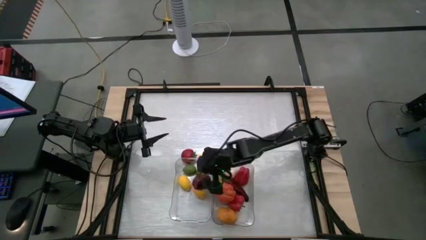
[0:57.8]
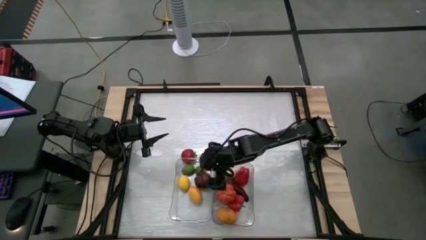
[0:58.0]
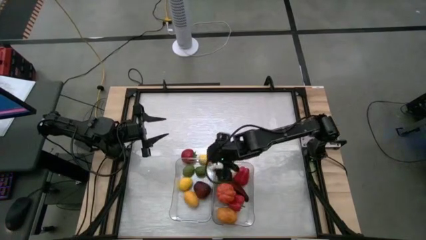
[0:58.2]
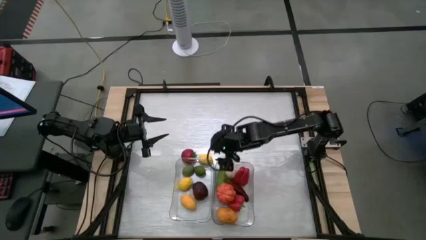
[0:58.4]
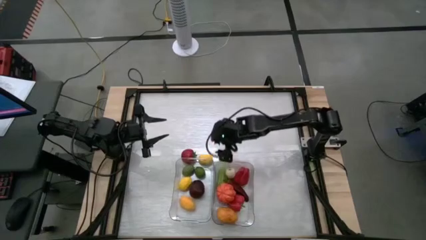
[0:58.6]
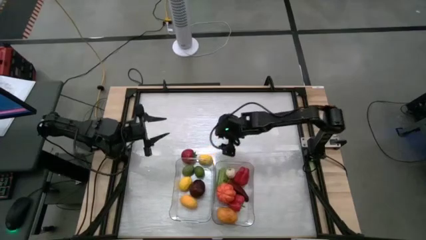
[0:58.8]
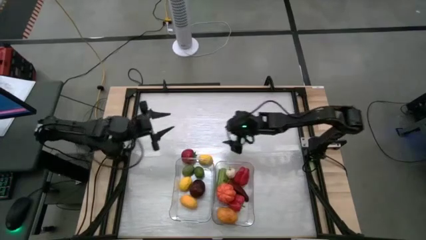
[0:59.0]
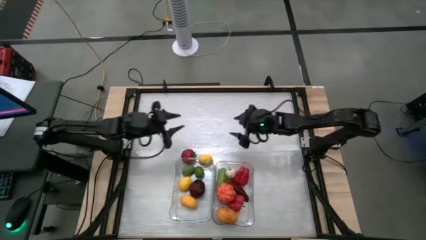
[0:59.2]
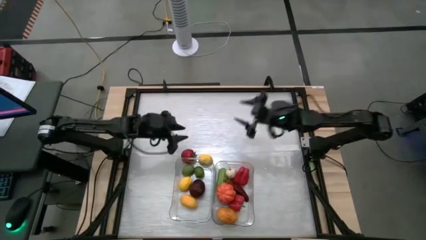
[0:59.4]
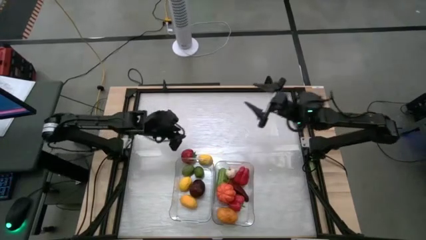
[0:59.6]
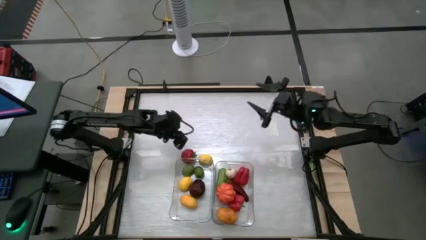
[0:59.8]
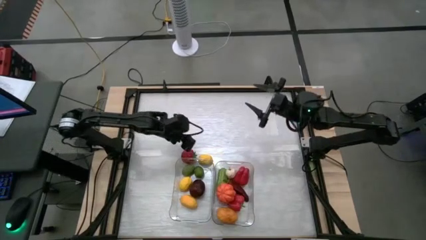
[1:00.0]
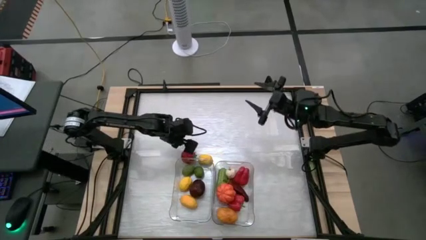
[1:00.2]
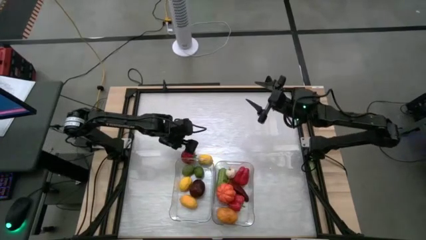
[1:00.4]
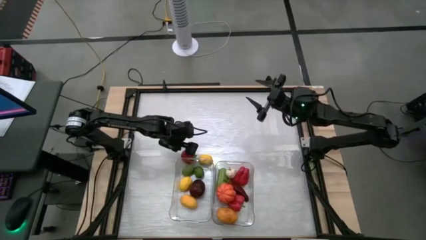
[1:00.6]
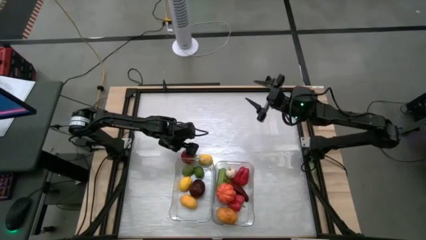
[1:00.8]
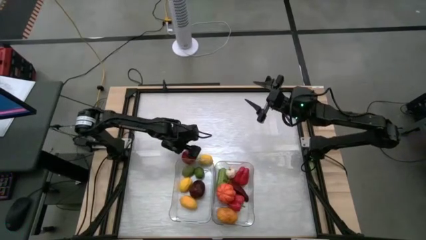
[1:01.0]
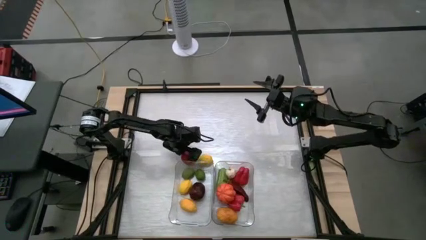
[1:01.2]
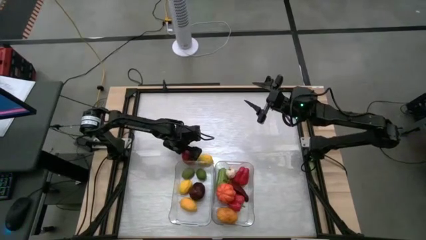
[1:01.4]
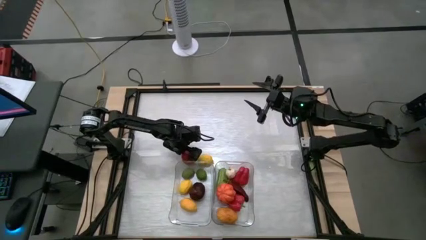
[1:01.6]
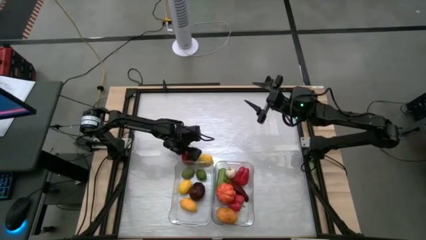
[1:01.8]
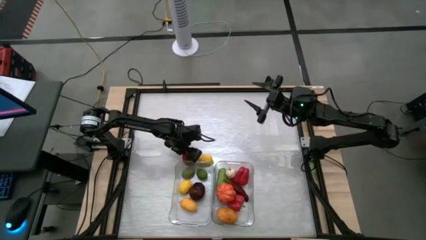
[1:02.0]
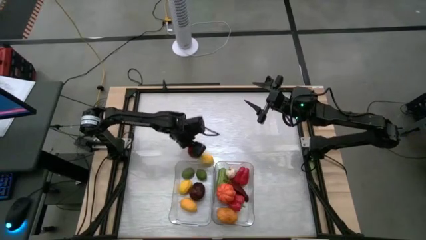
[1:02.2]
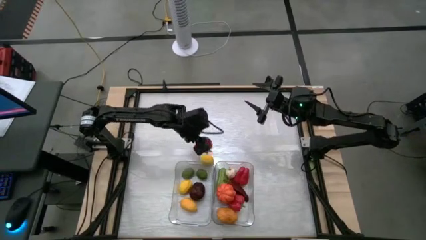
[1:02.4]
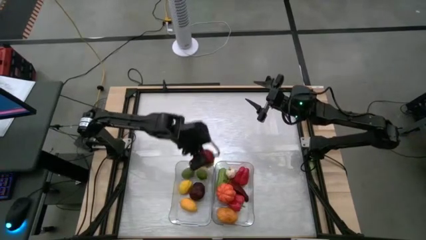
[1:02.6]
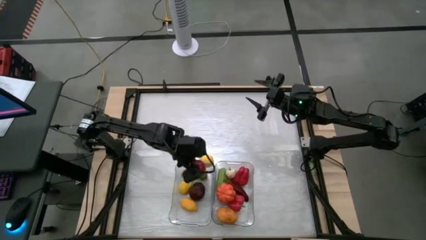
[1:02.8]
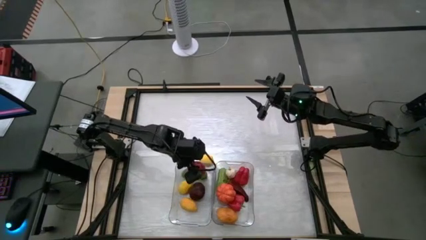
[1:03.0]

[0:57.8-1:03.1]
Task: Sort produce into baskets
Put the tomato into the left transparent bin

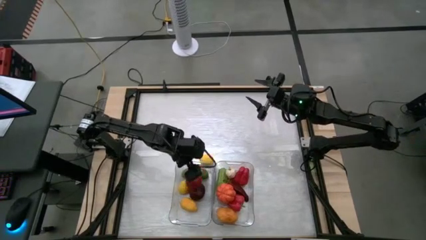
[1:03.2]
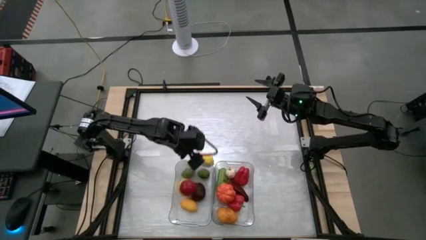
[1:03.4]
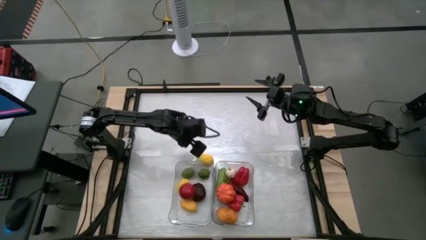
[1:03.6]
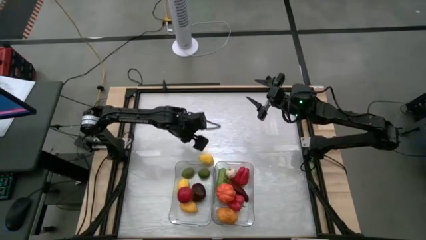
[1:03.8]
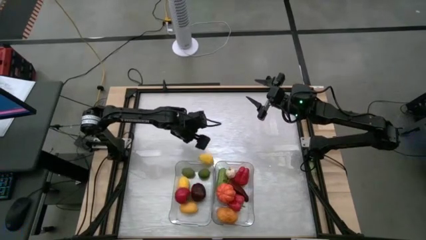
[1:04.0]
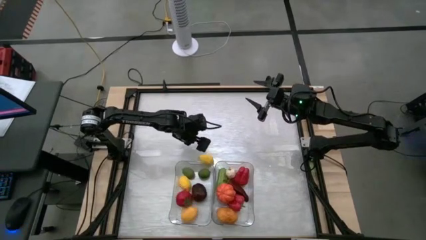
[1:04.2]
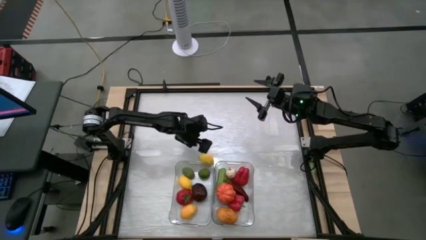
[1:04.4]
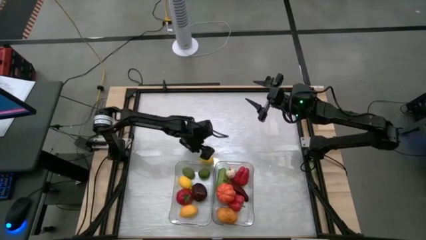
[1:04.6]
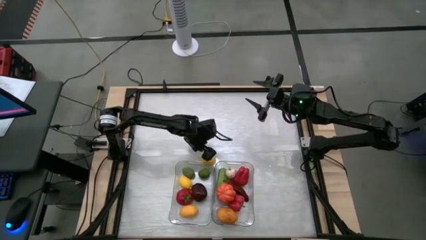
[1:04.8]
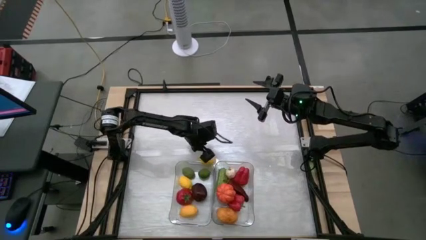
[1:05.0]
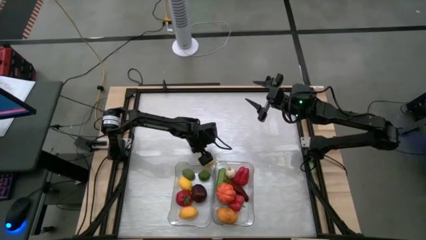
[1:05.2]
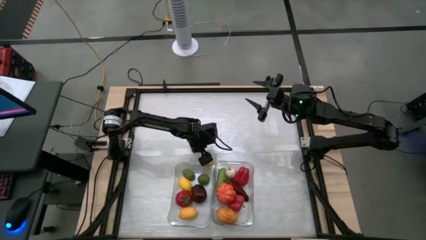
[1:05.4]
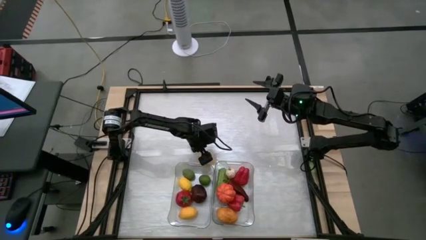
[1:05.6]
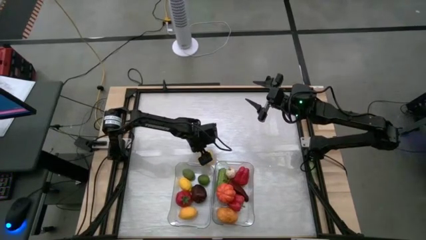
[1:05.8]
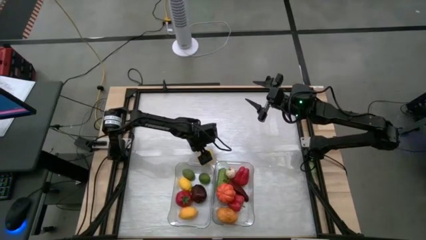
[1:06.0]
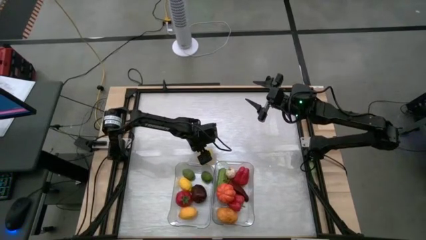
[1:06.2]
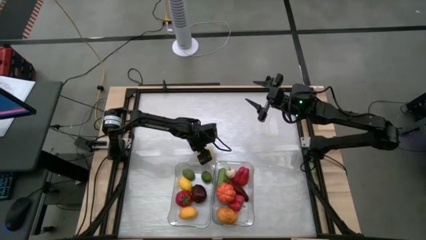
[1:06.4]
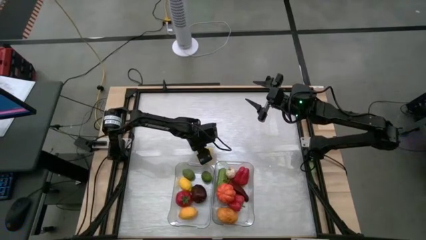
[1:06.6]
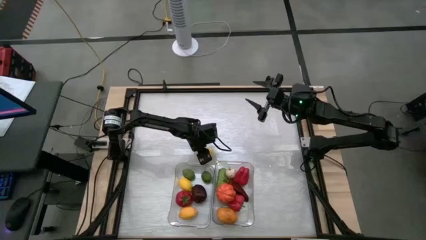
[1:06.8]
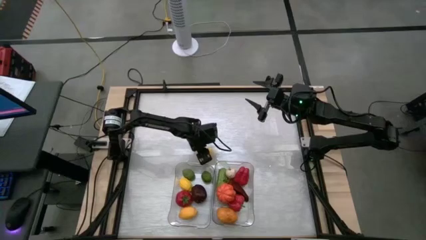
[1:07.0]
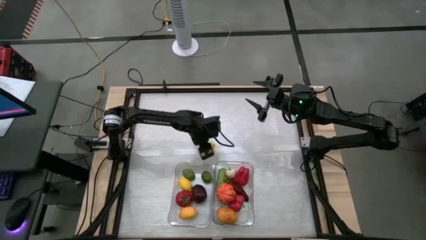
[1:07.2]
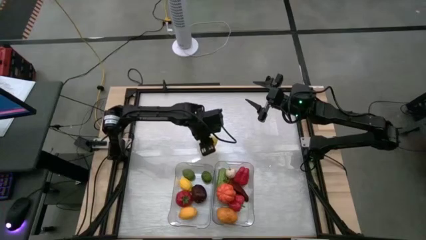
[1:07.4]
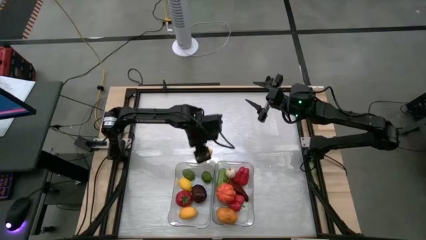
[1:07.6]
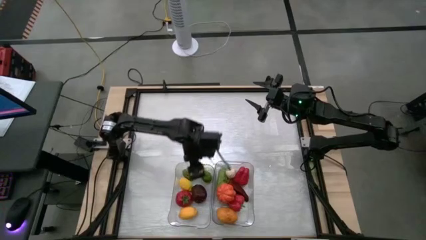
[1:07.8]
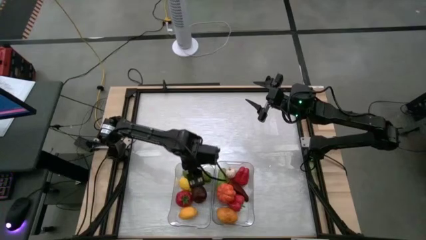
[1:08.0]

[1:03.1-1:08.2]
Put the lemon into the left transparent bin

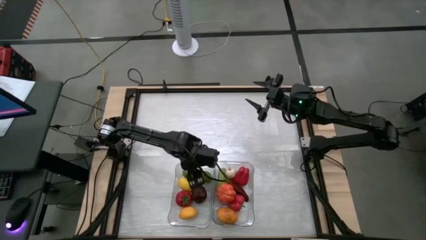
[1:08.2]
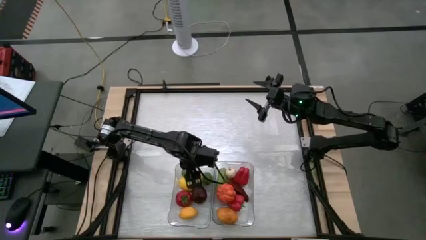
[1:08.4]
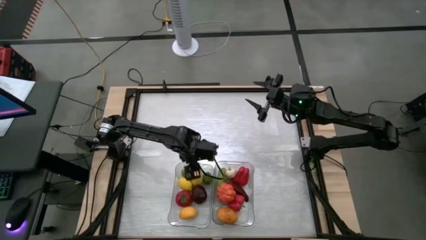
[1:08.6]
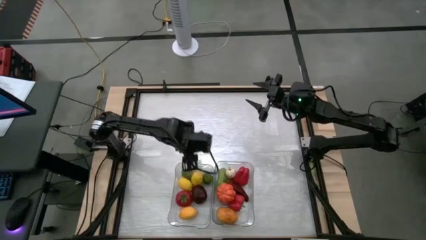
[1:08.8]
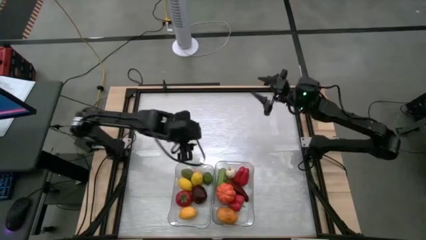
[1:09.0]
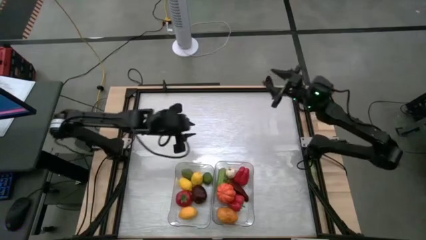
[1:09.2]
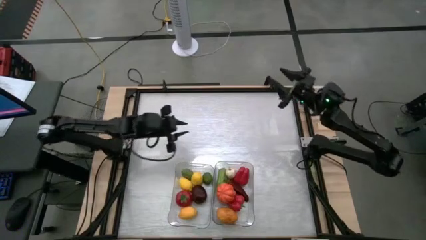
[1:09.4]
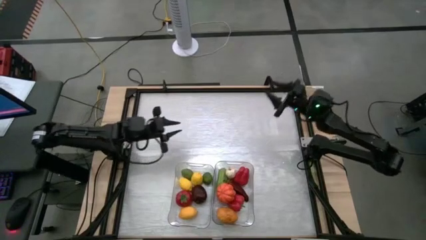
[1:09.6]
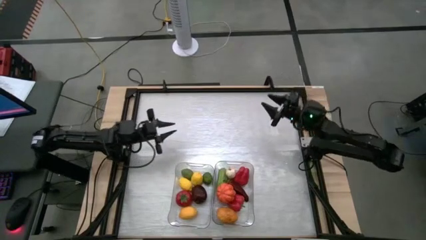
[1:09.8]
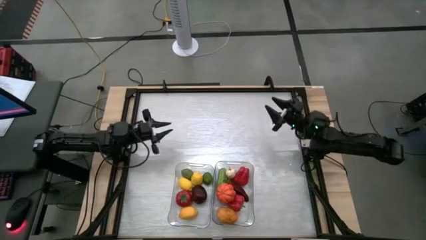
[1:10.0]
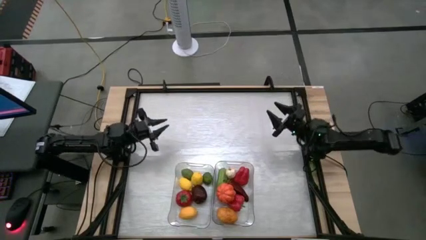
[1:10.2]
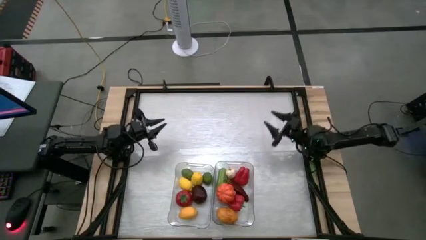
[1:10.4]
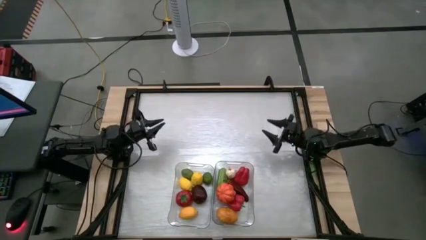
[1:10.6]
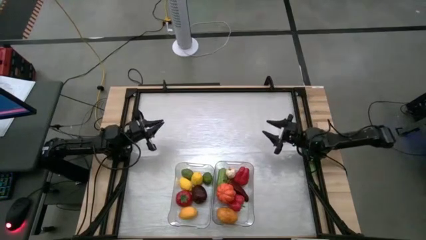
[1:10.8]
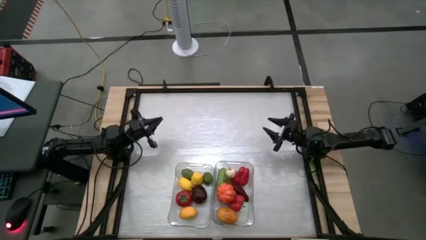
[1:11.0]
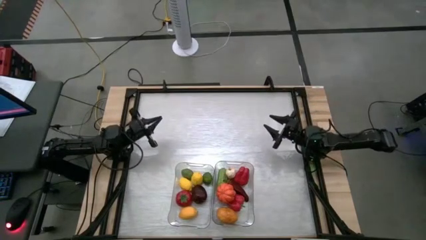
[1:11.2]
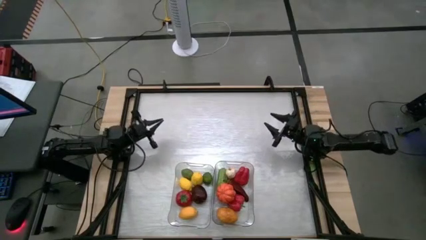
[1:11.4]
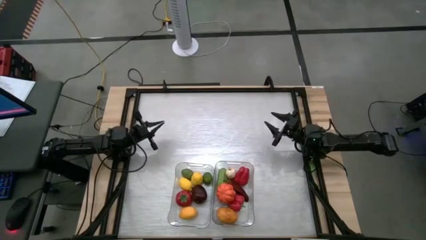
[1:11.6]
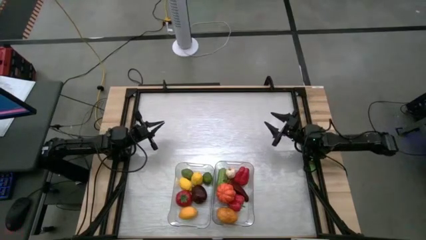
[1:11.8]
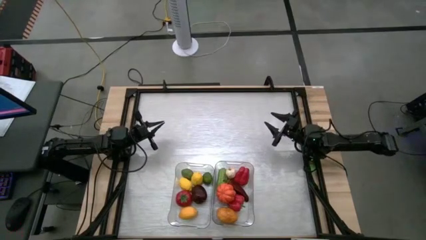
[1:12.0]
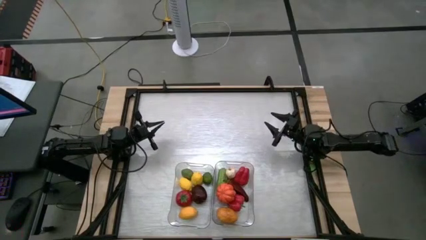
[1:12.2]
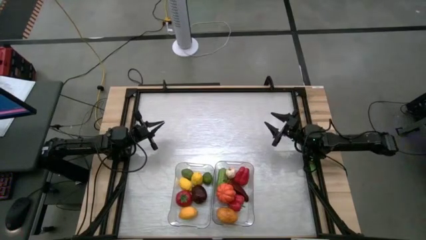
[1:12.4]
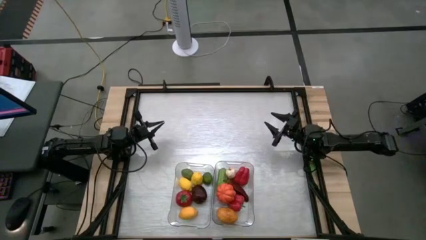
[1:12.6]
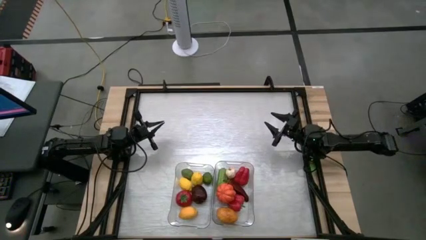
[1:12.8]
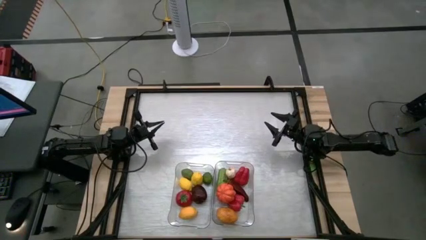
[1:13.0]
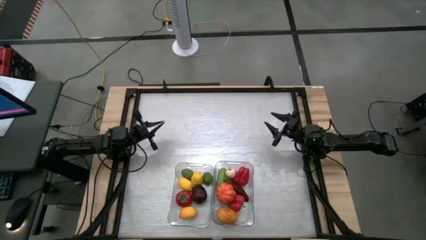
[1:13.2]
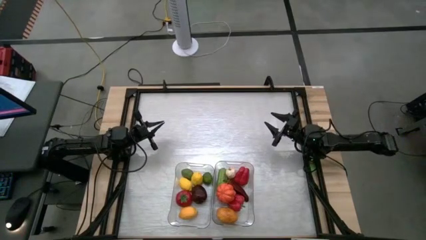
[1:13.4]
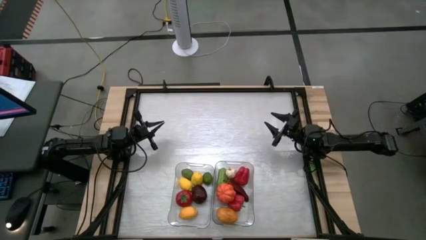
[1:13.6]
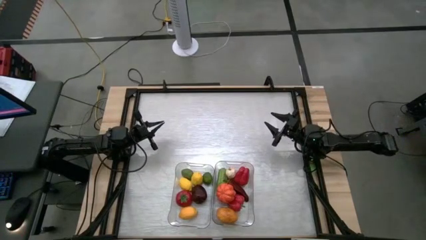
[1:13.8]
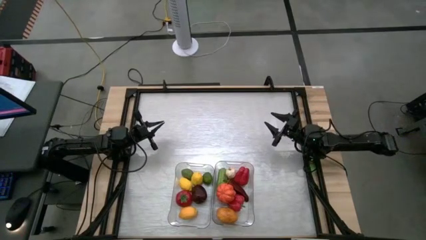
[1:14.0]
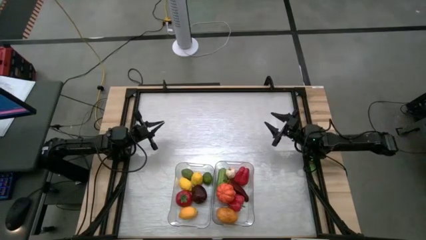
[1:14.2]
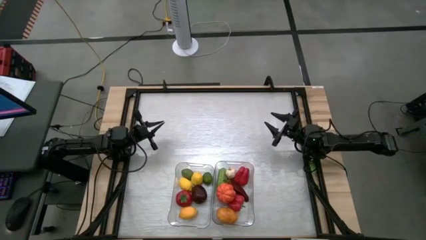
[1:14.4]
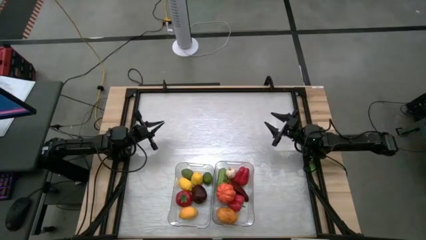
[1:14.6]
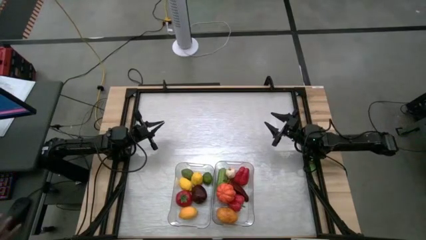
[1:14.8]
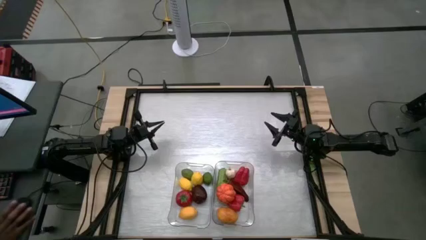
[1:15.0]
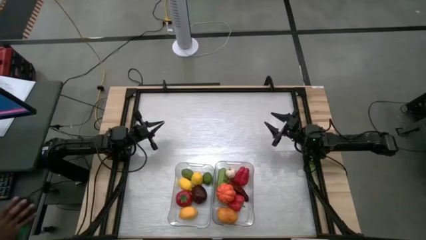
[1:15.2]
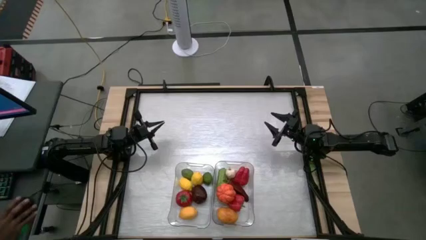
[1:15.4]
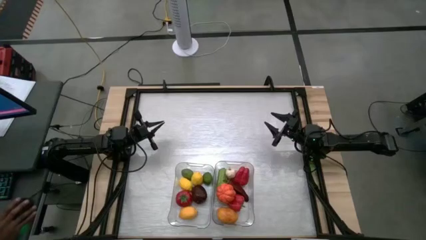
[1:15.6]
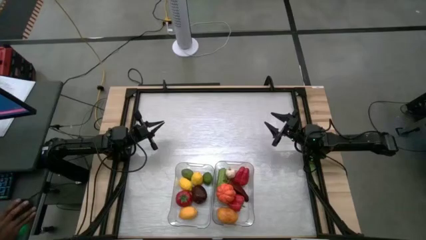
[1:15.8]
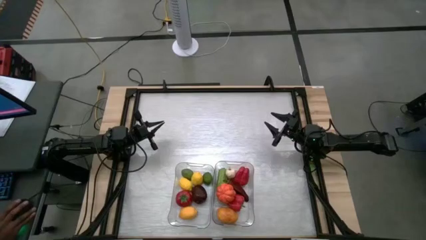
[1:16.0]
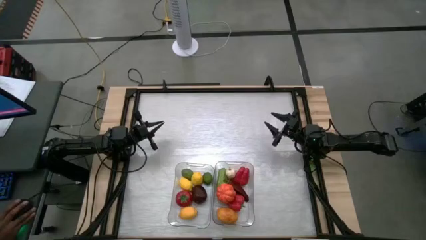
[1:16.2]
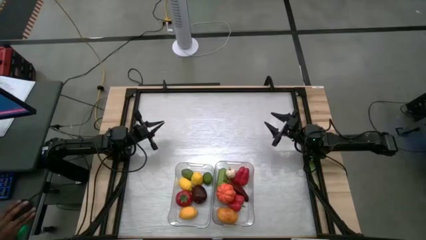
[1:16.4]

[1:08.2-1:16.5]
Return to Home Position
